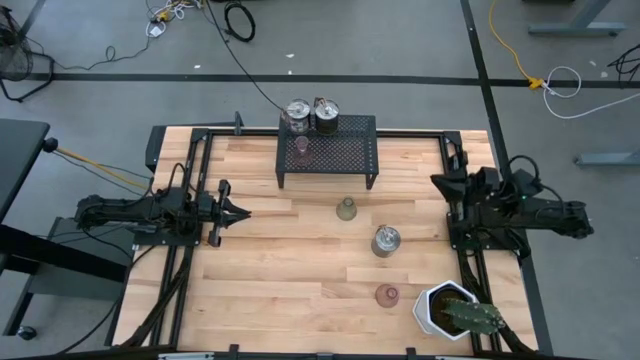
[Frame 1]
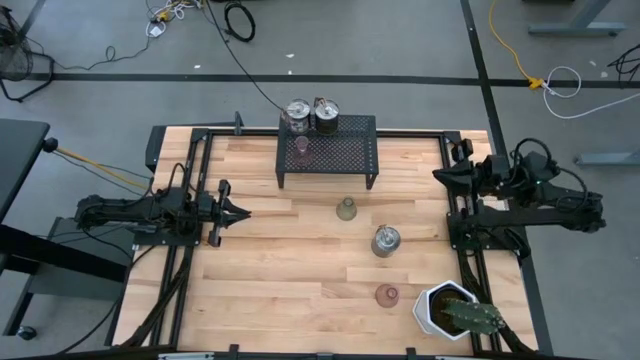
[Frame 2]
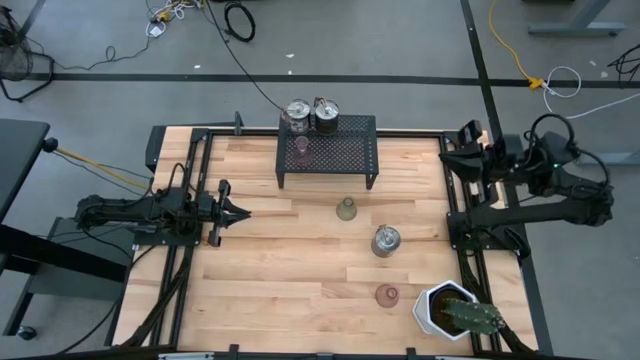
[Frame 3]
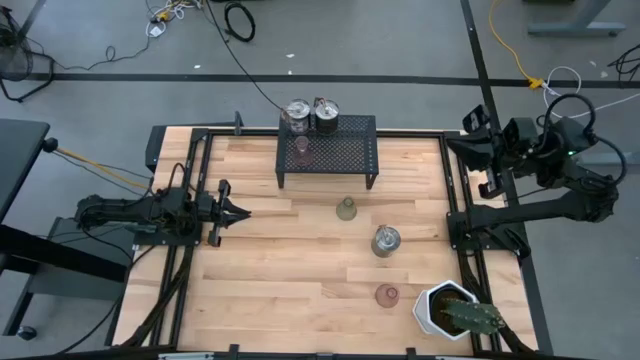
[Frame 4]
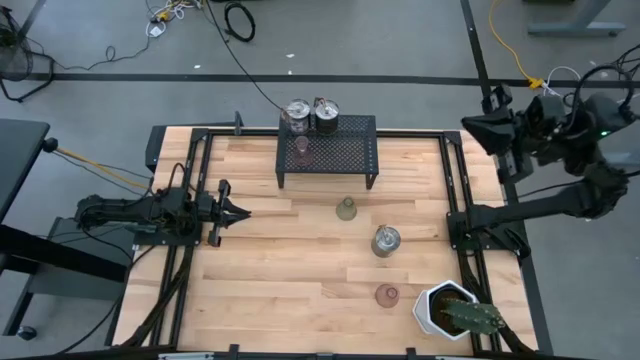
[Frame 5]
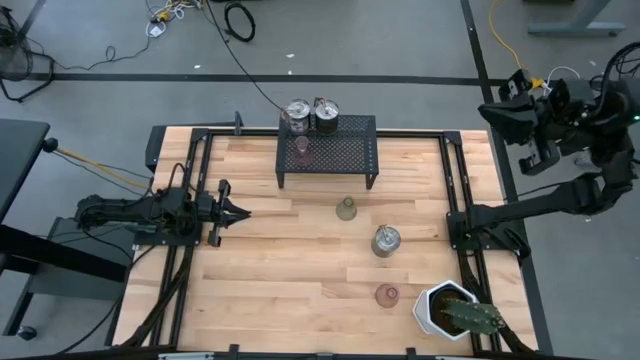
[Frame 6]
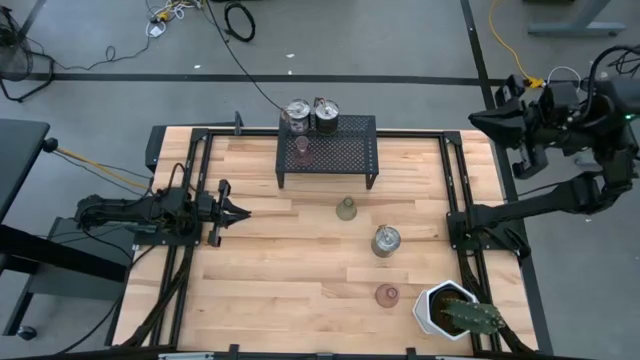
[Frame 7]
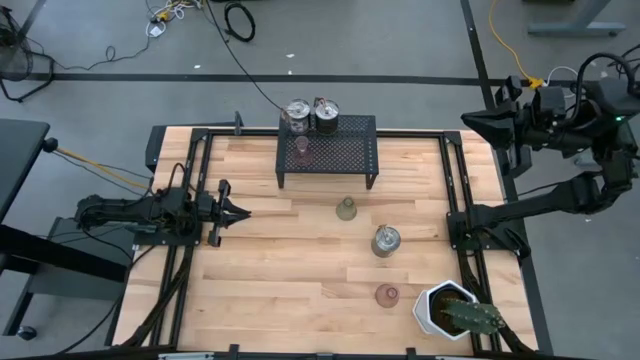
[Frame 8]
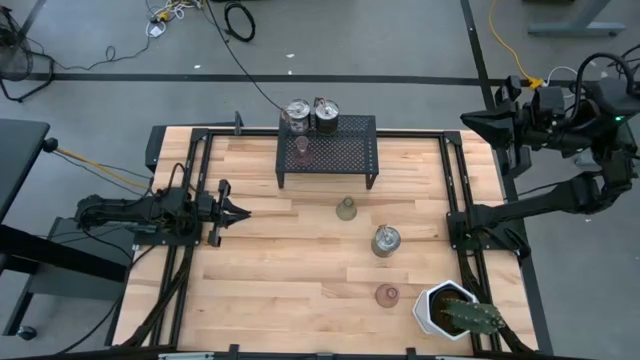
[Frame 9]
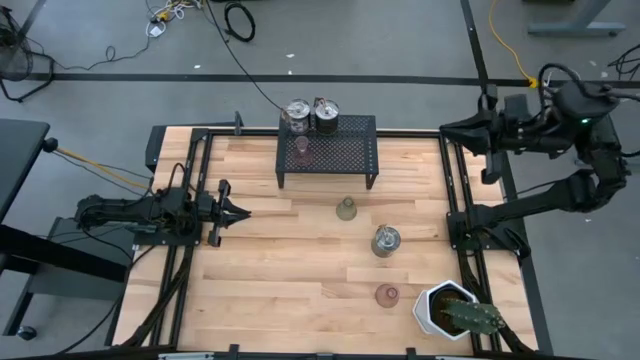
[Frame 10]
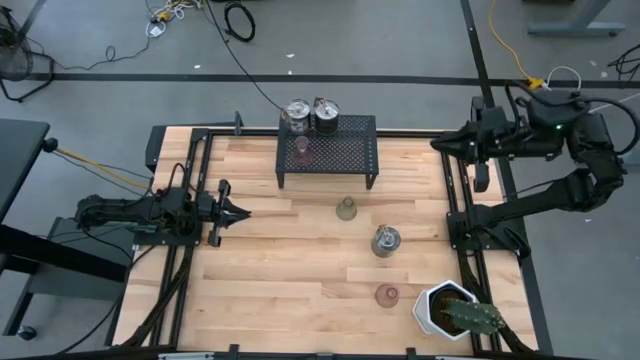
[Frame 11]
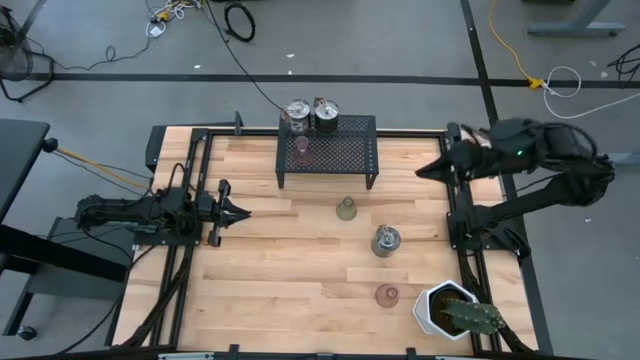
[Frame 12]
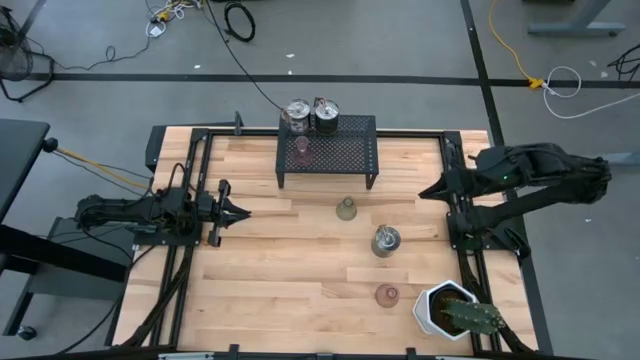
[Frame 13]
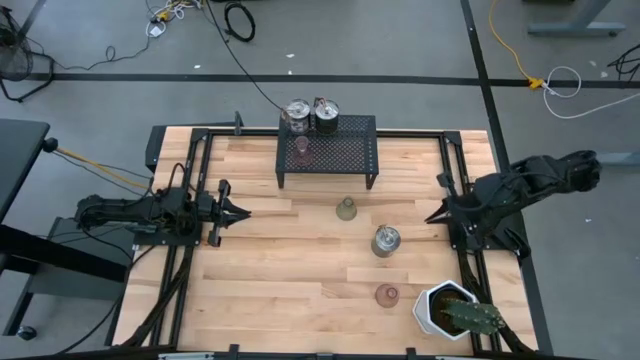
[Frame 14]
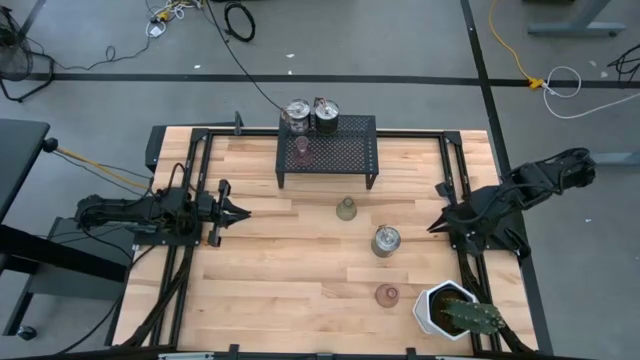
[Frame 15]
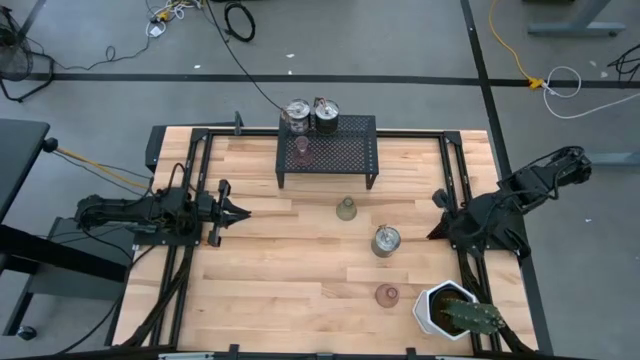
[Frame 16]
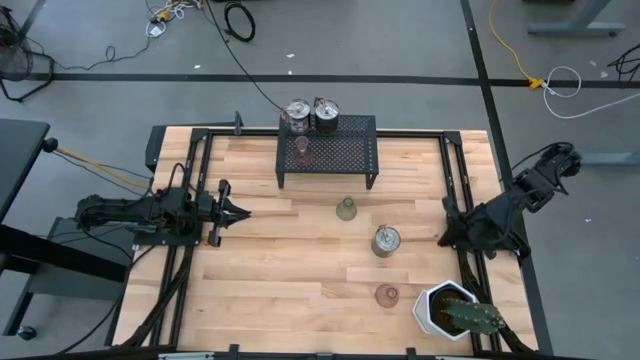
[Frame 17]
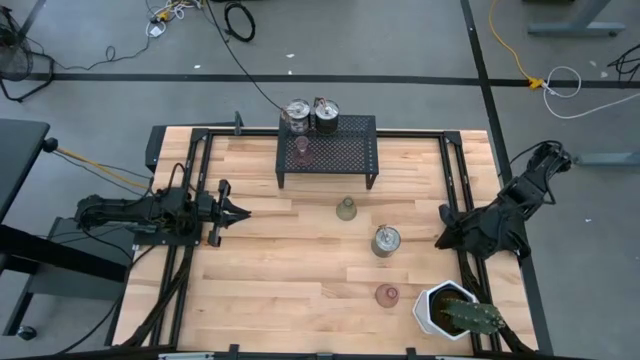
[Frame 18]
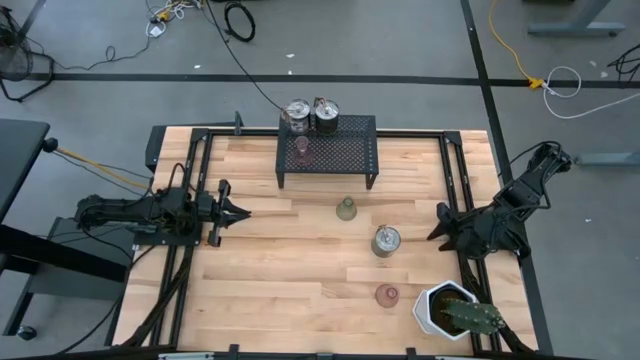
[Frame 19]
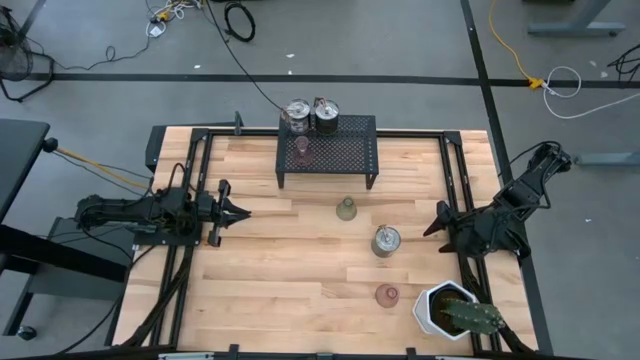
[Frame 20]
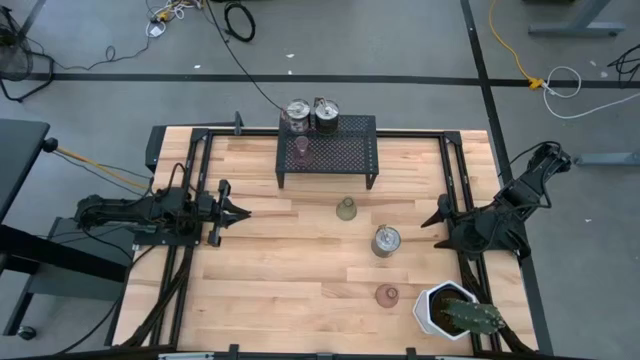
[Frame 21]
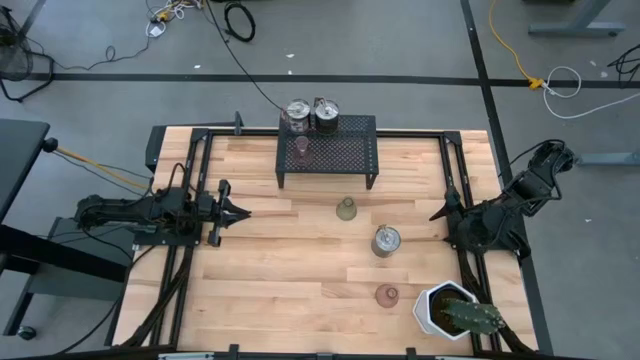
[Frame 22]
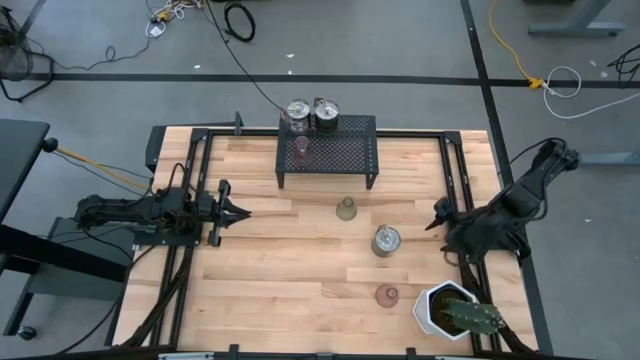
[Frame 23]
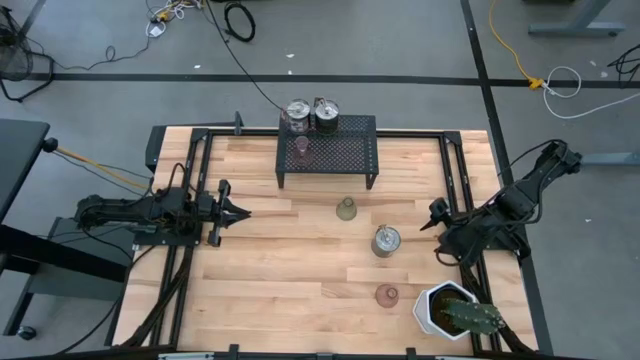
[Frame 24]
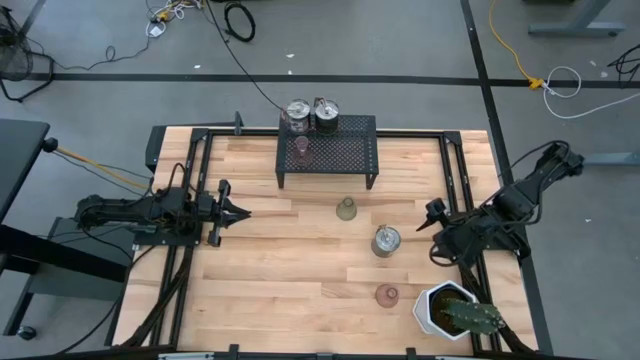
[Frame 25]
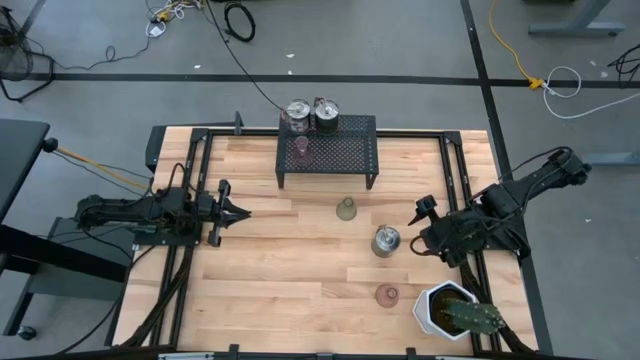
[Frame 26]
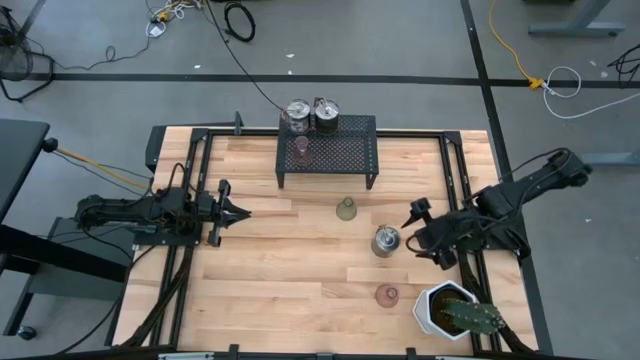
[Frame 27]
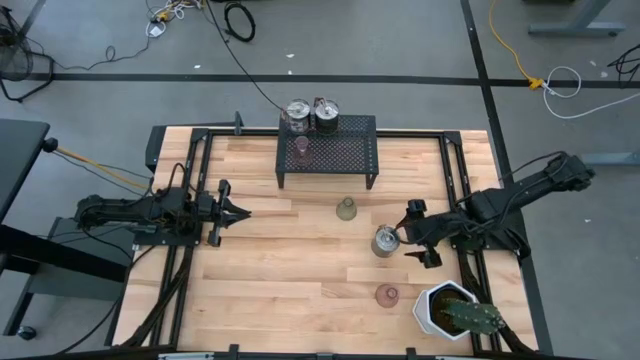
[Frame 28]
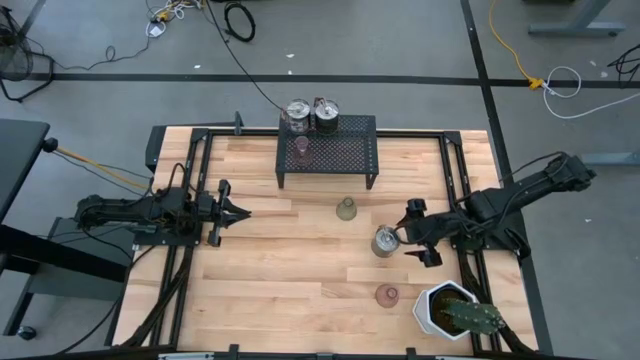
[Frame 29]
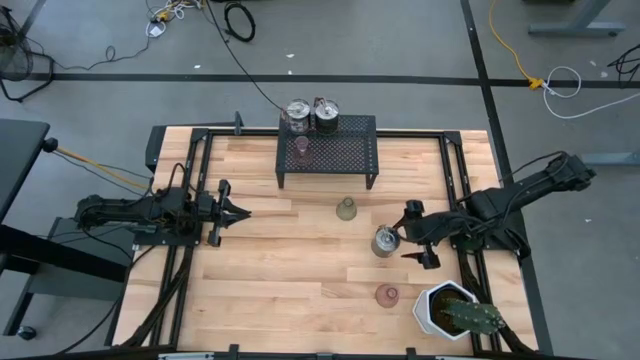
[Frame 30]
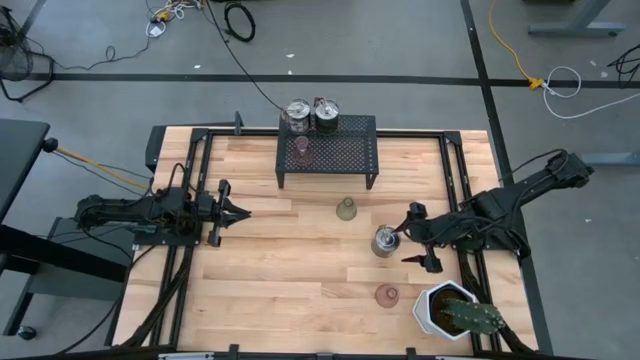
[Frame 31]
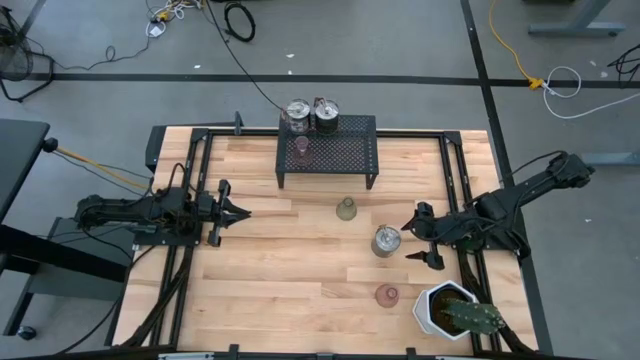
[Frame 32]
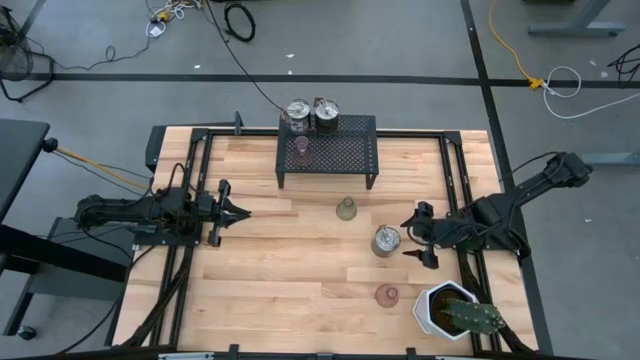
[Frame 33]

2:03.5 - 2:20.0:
Task: Pick & Place candle stick holders
Put the silver scented candle on the shelf

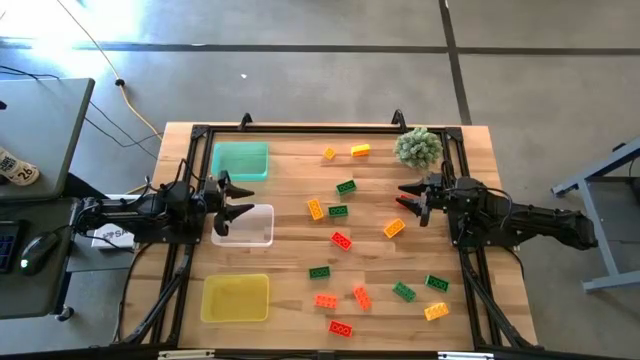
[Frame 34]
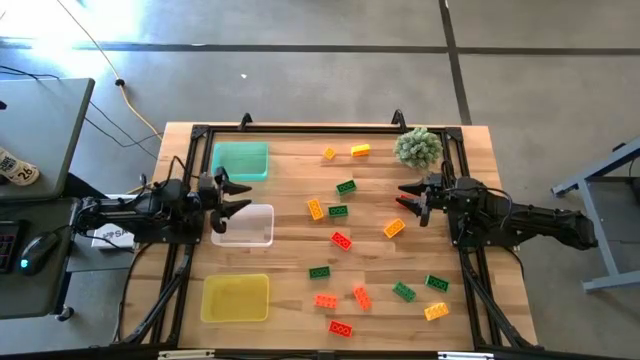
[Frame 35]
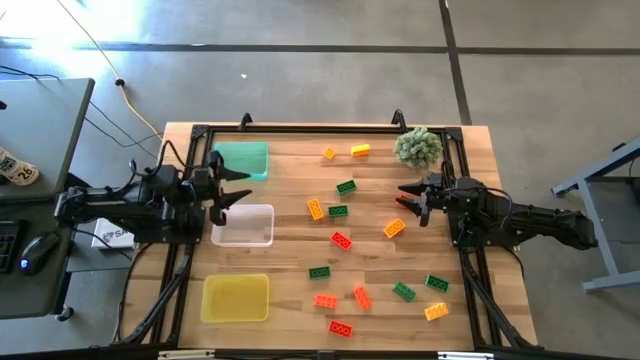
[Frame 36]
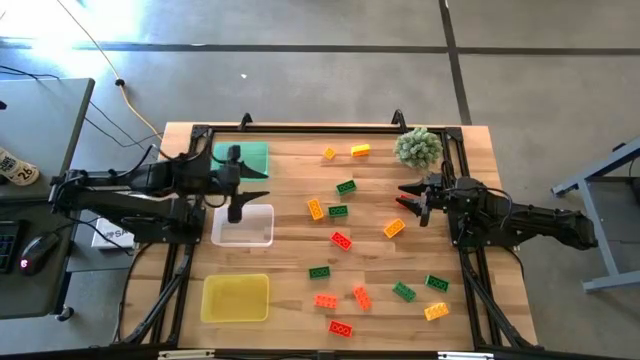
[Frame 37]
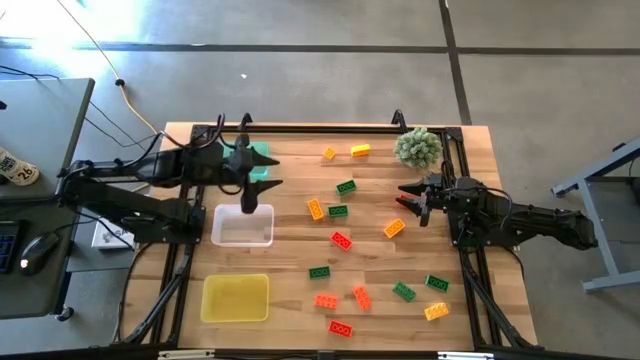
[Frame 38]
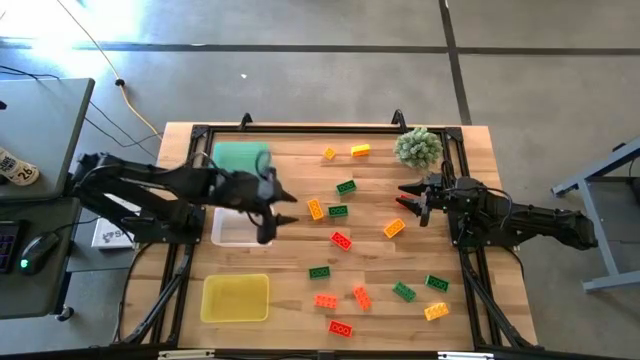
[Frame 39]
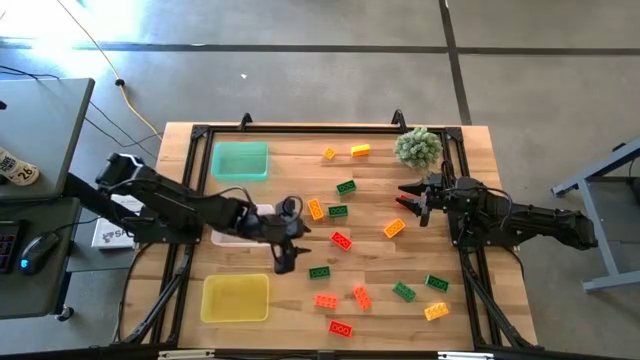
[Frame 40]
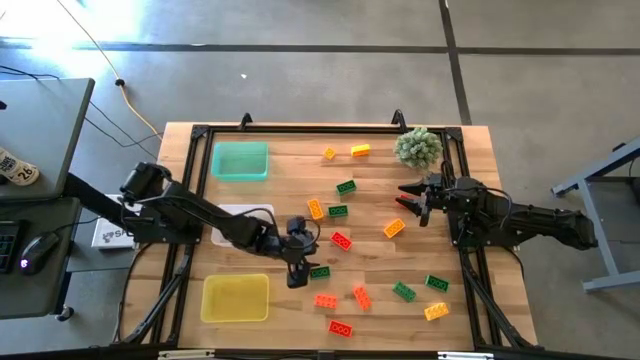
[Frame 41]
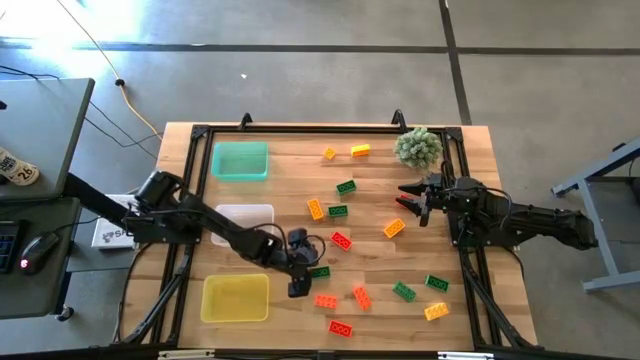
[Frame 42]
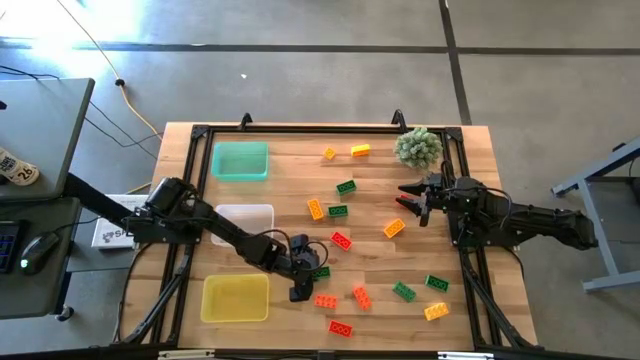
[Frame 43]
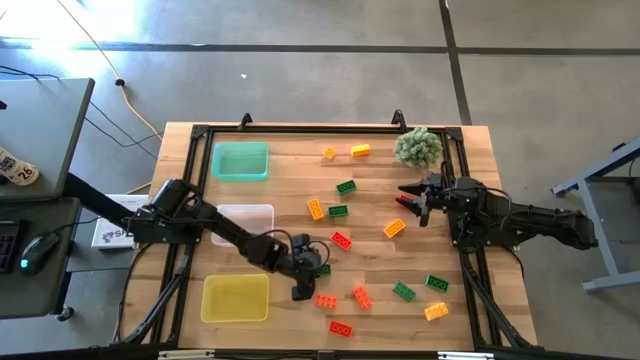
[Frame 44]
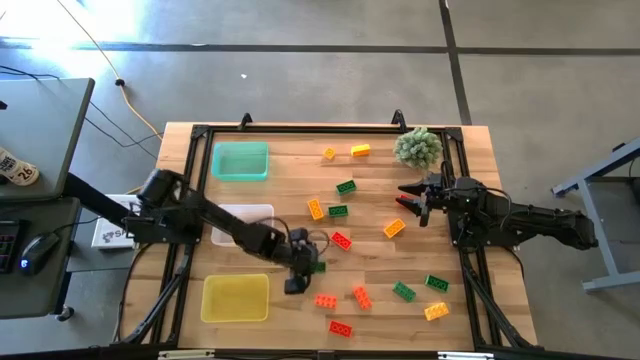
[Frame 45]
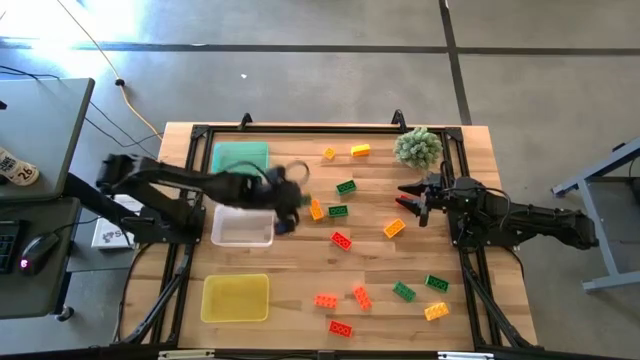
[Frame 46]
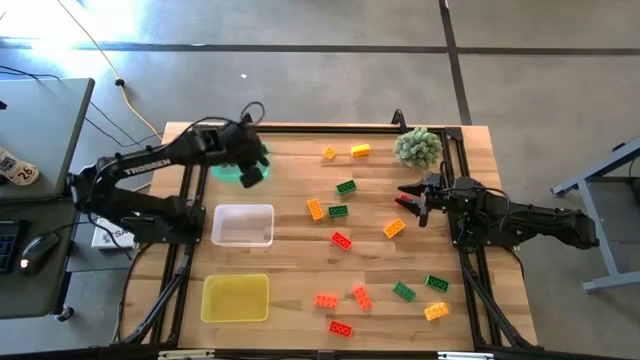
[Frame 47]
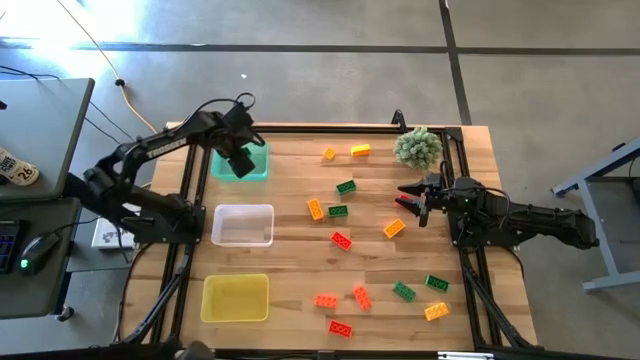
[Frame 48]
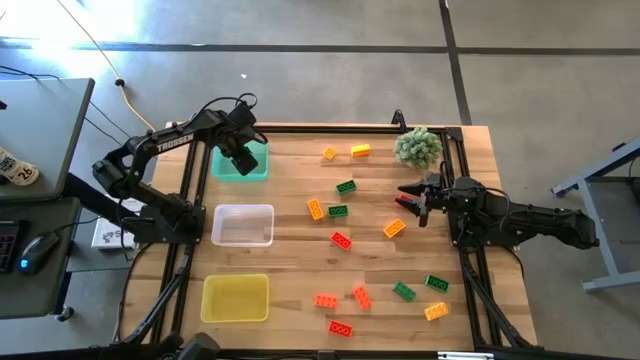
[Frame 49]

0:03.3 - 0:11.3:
Task: Sort & place blocks by color
Put the green game piece into the green bin
